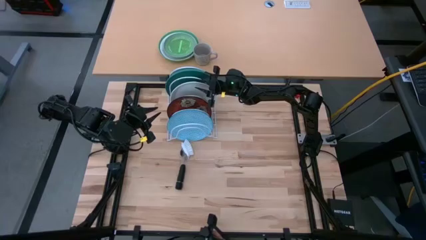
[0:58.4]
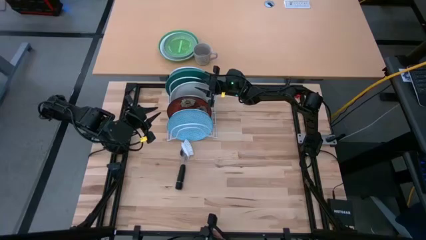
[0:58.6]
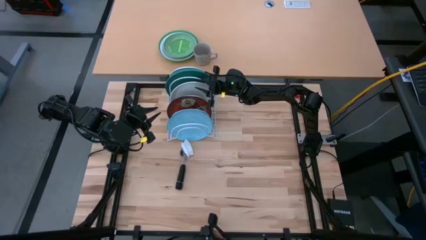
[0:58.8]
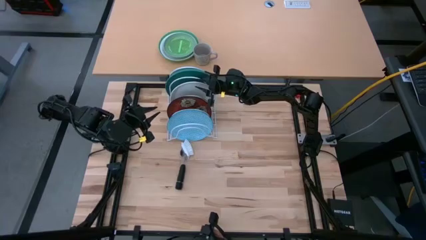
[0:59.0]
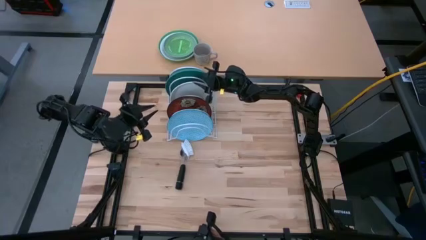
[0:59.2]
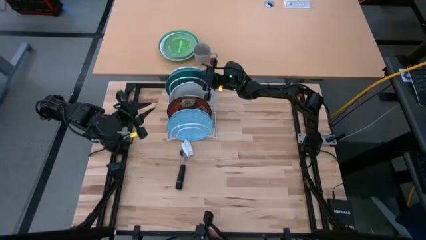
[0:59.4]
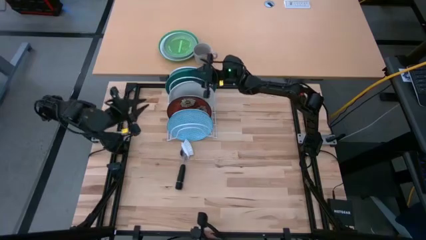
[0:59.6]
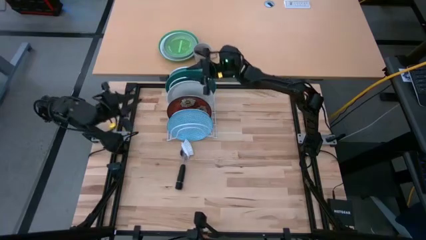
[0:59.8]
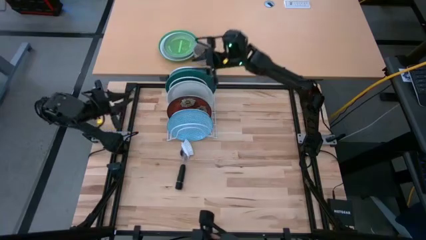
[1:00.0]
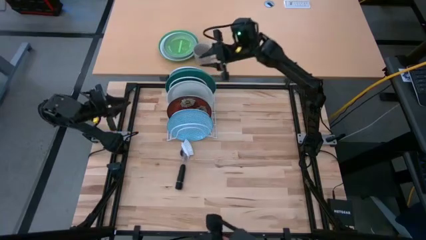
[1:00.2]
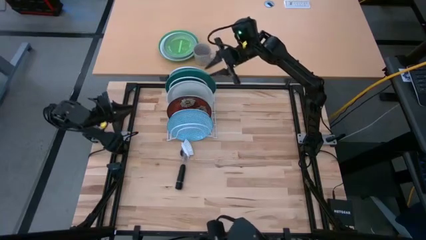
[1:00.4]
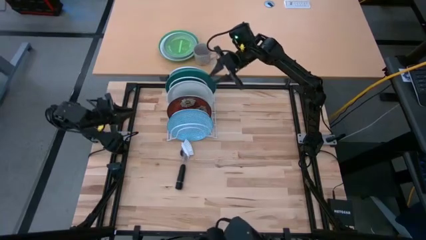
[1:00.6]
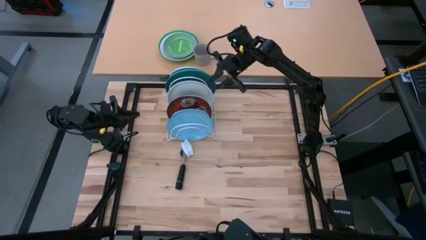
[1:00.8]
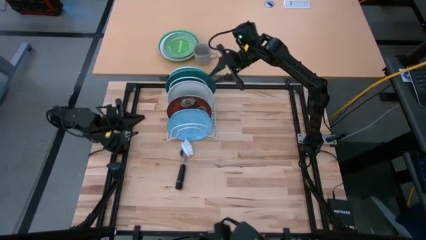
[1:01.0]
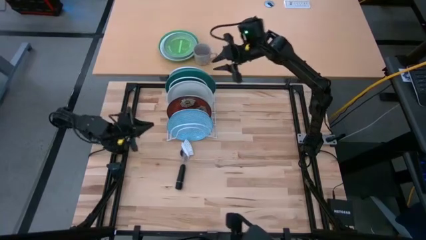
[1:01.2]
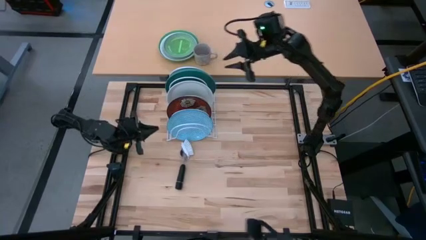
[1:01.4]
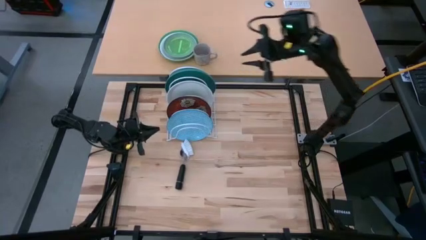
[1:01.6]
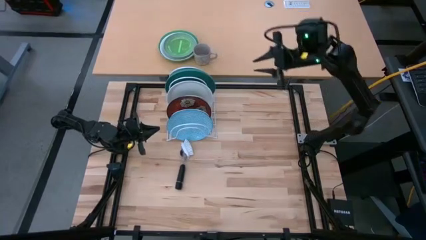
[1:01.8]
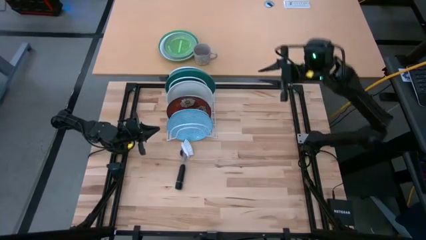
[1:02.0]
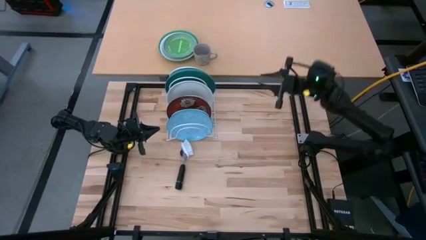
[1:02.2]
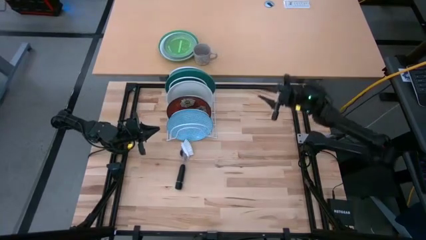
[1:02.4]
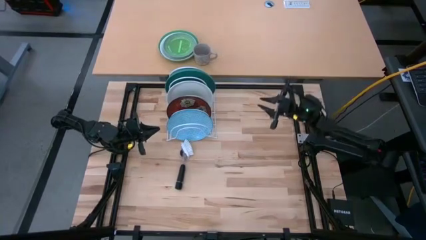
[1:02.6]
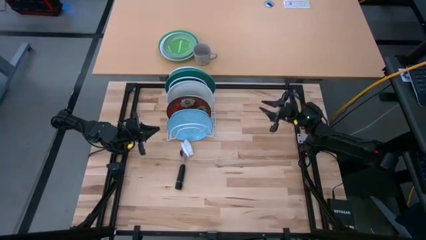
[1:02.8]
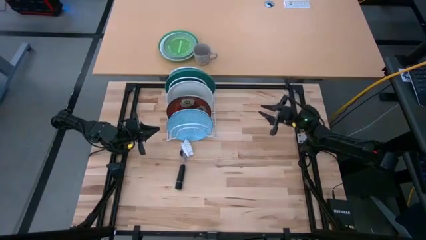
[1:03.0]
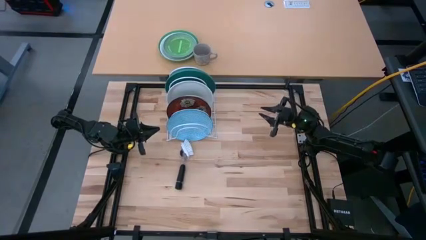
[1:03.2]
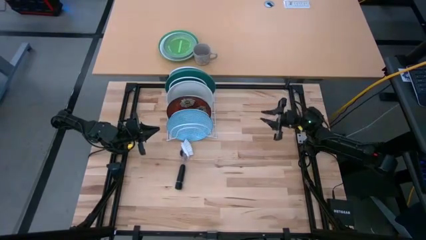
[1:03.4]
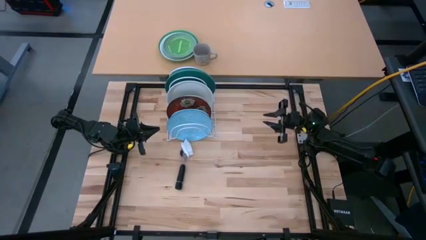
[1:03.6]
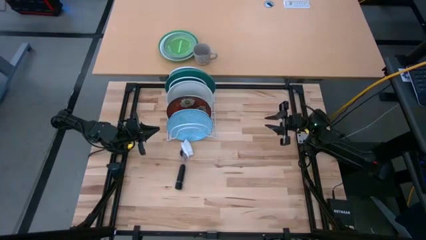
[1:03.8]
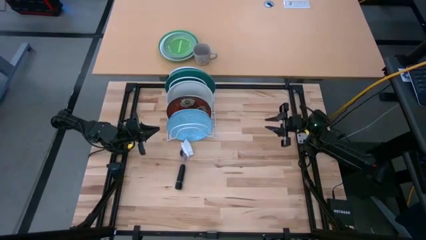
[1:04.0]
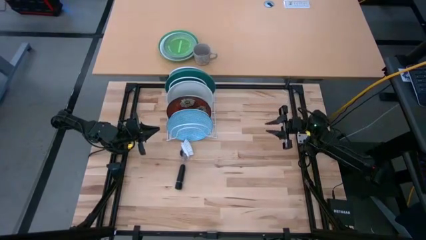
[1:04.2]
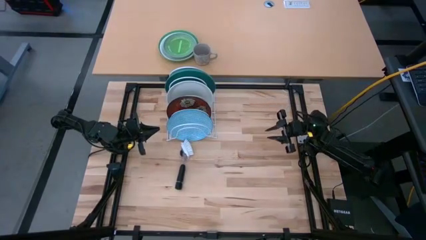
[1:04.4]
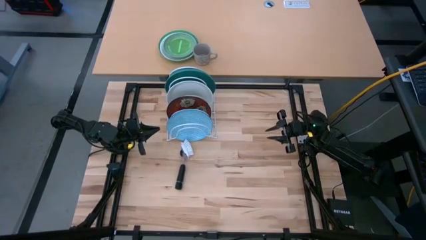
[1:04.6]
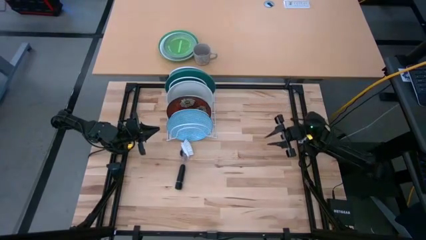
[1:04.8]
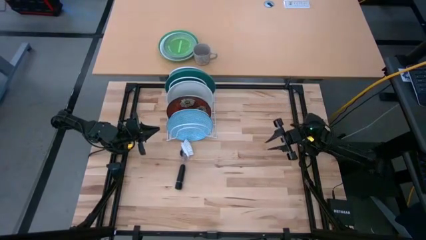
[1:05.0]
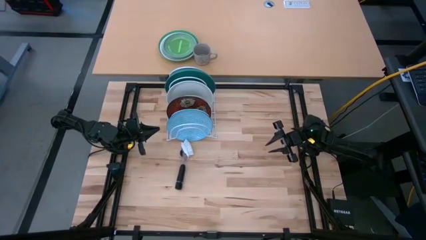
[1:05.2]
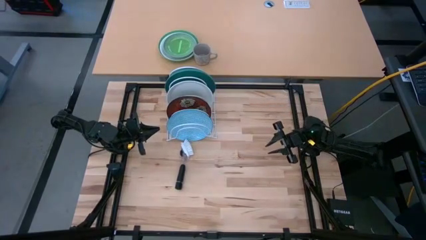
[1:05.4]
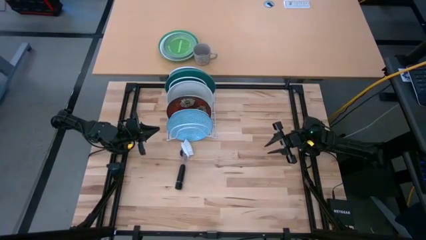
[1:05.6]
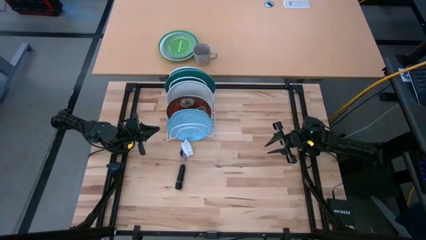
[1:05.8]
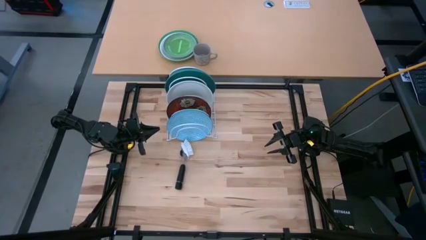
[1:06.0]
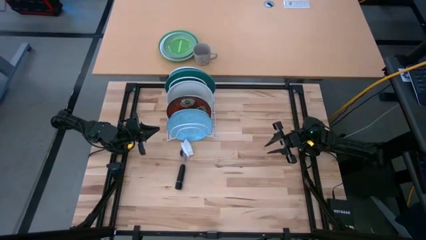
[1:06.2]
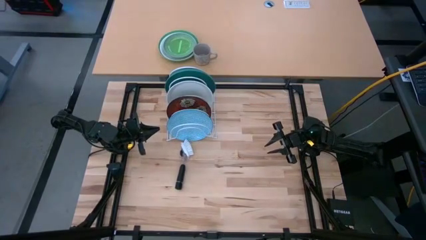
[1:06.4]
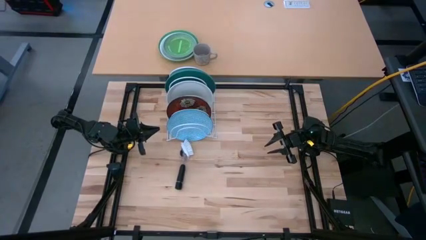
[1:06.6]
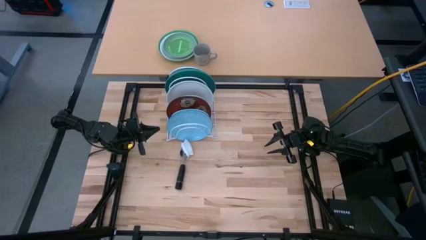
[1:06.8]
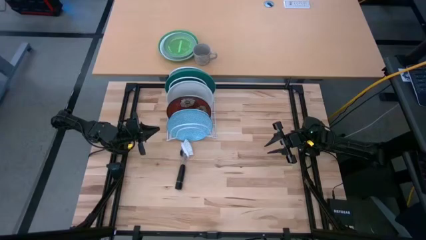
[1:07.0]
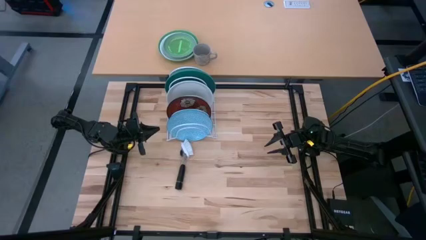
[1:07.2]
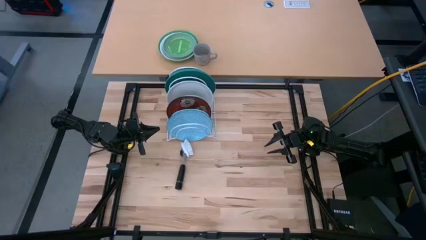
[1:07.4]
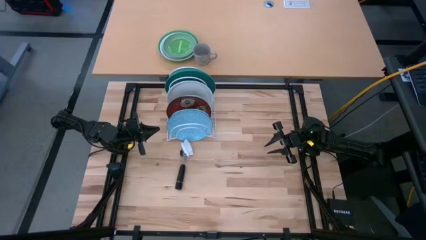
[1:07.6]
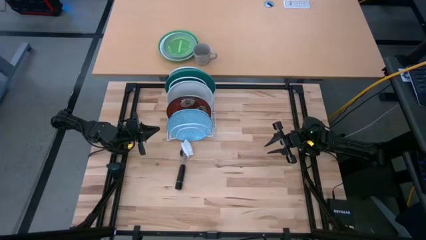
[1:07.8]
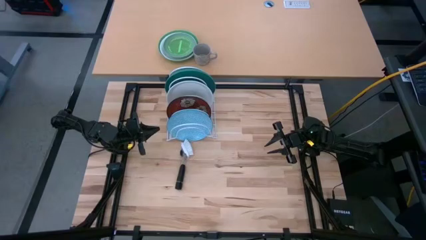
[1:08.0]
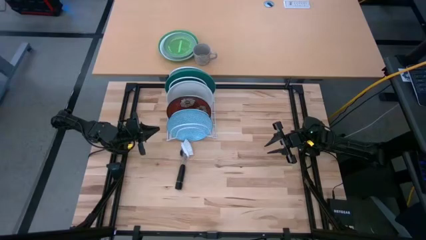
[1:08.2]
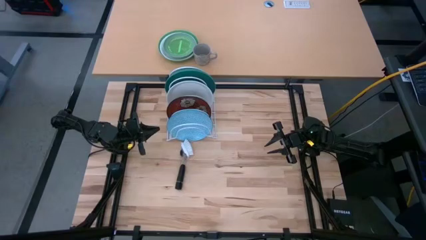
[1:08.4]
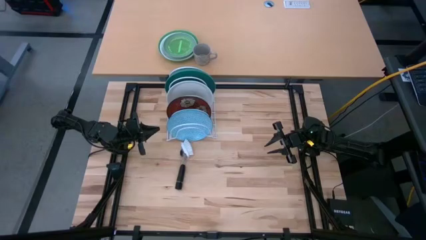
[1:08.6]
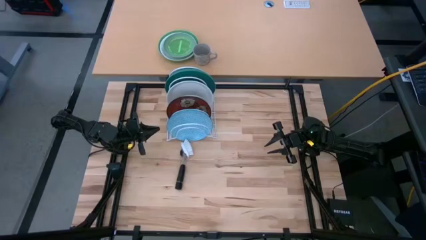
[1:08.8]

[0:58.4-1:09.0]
Task: Sort dishes
Return to home position
